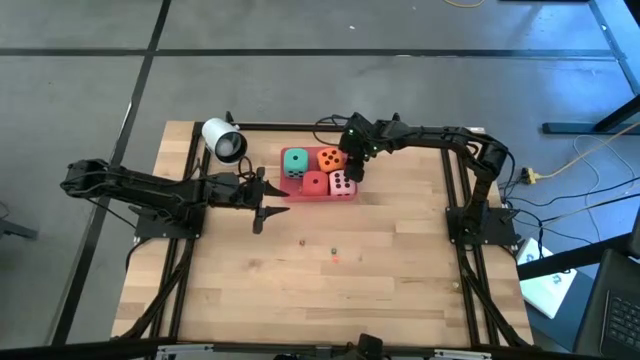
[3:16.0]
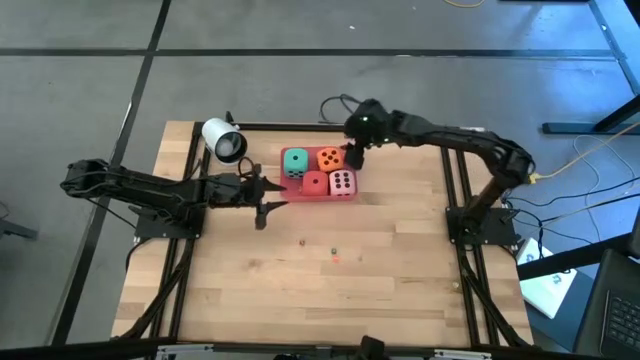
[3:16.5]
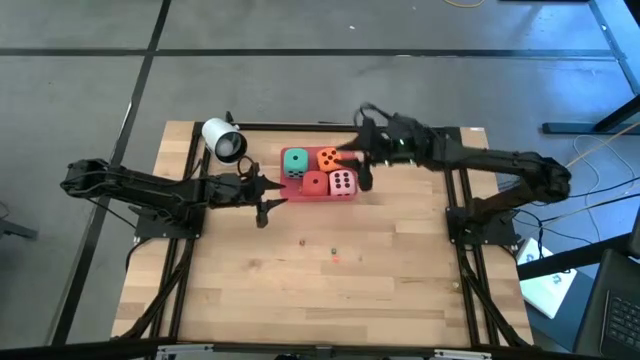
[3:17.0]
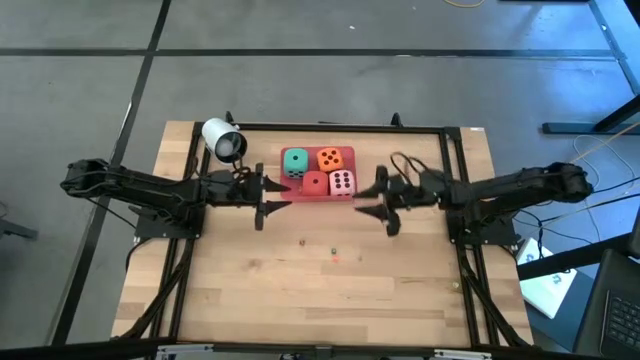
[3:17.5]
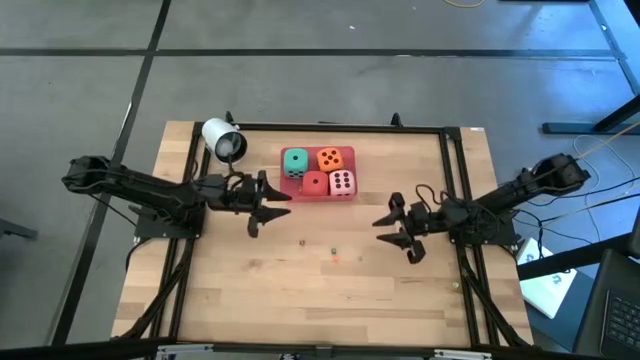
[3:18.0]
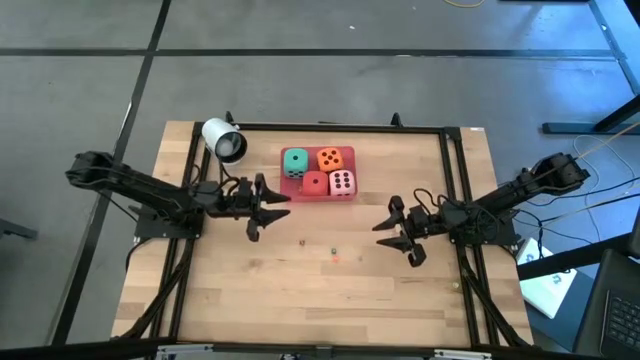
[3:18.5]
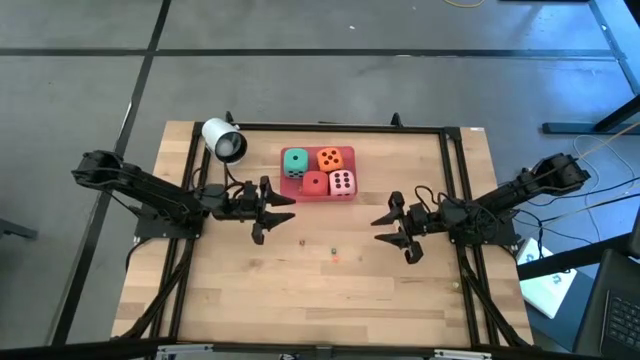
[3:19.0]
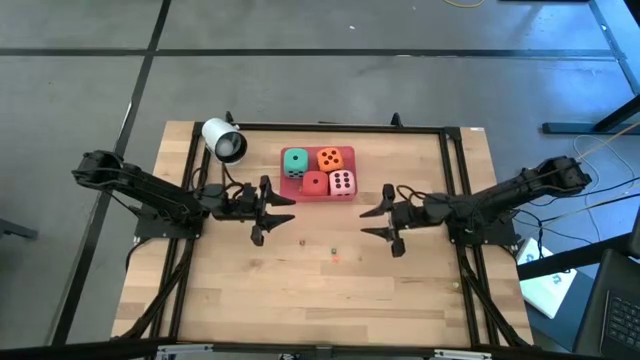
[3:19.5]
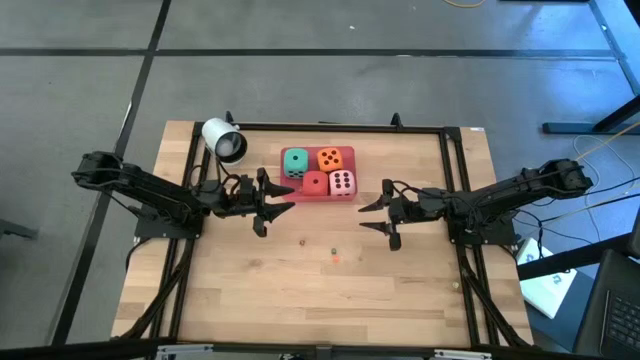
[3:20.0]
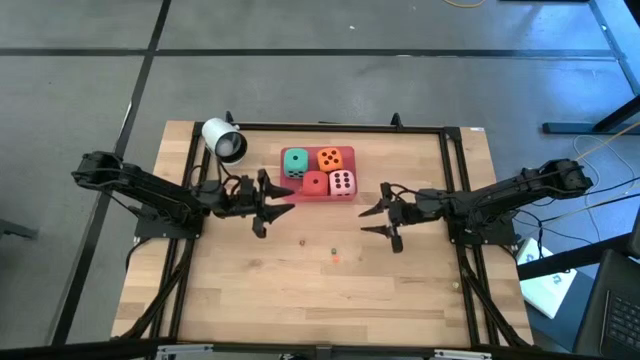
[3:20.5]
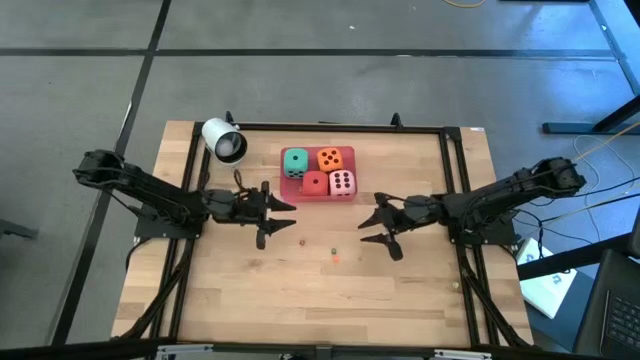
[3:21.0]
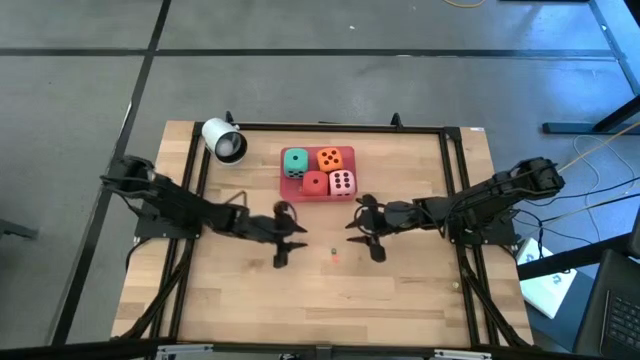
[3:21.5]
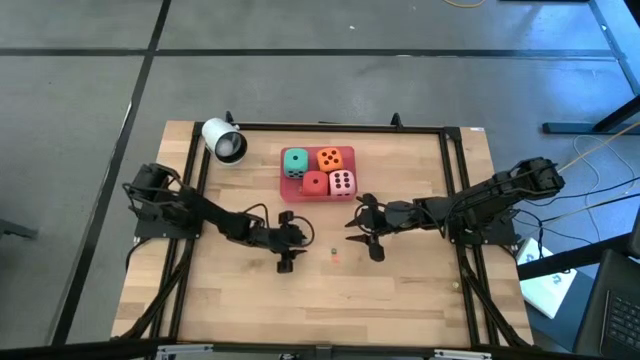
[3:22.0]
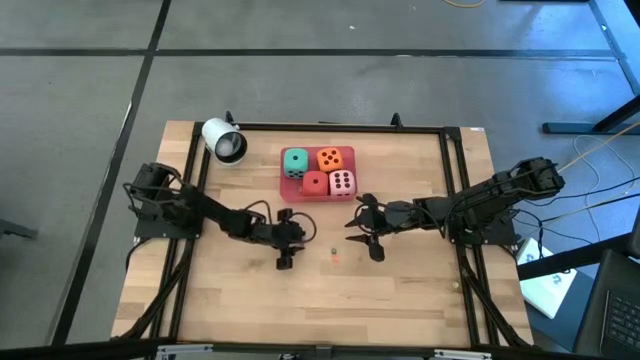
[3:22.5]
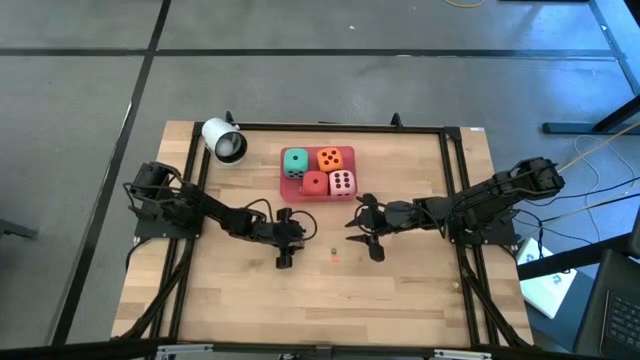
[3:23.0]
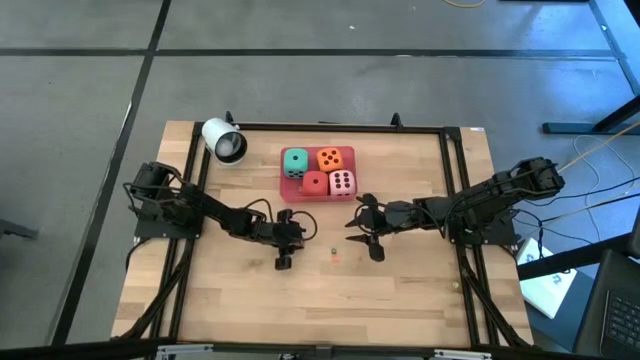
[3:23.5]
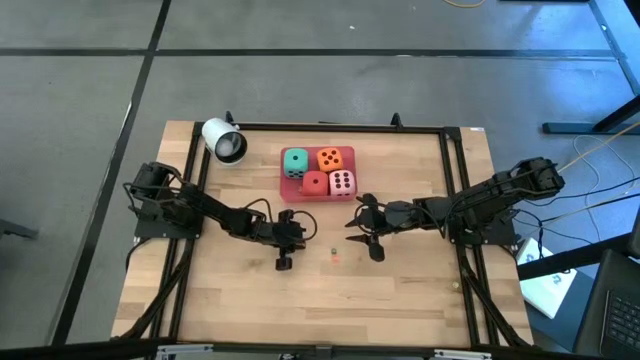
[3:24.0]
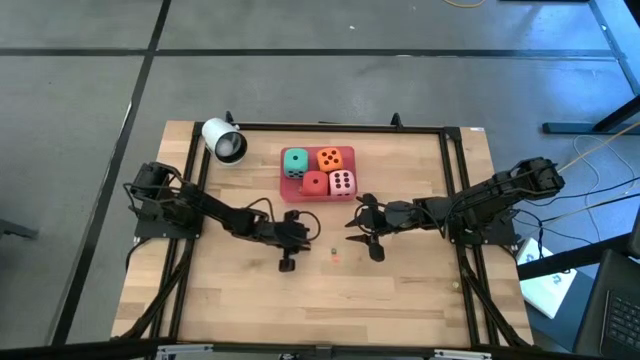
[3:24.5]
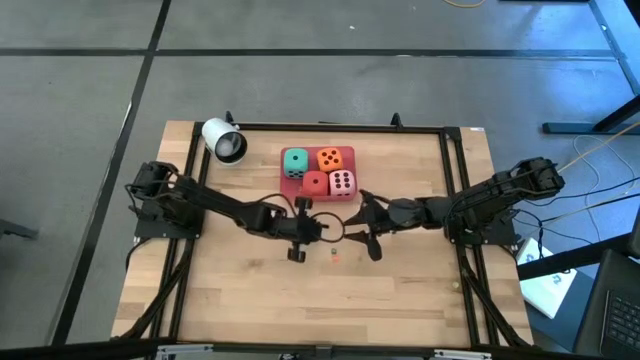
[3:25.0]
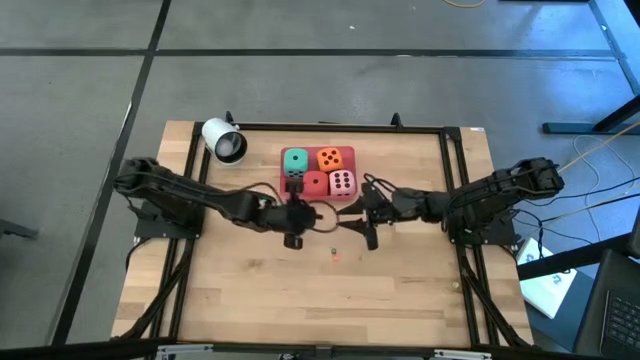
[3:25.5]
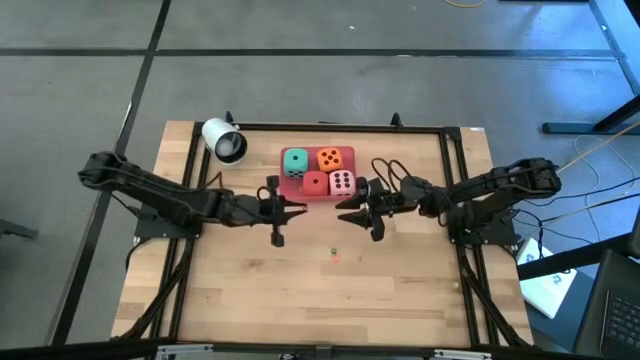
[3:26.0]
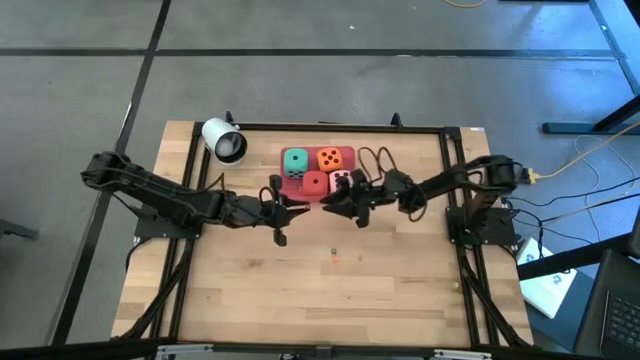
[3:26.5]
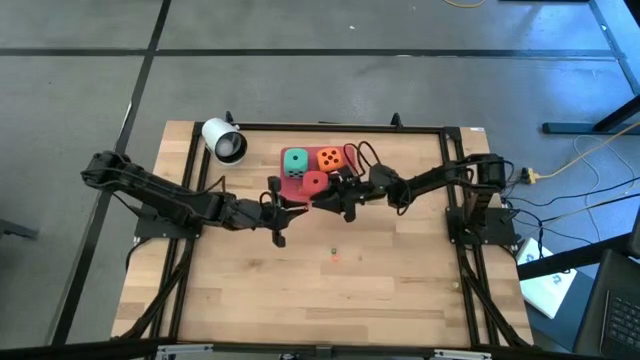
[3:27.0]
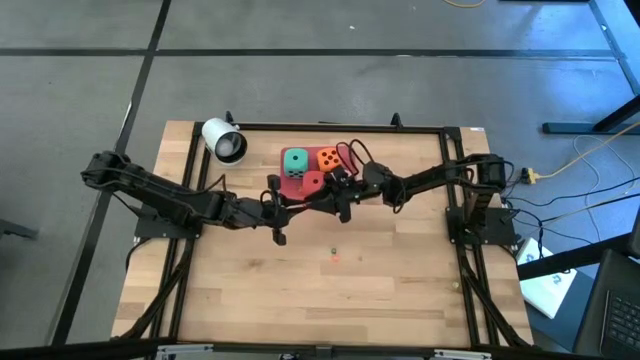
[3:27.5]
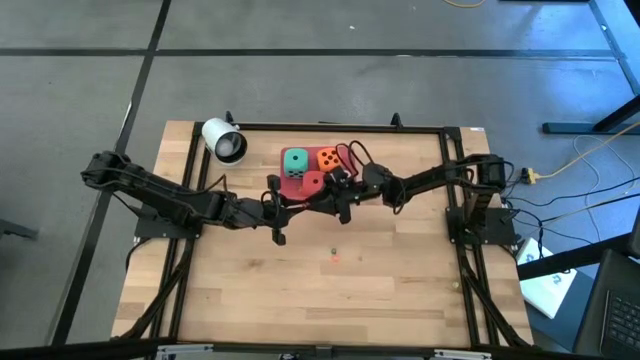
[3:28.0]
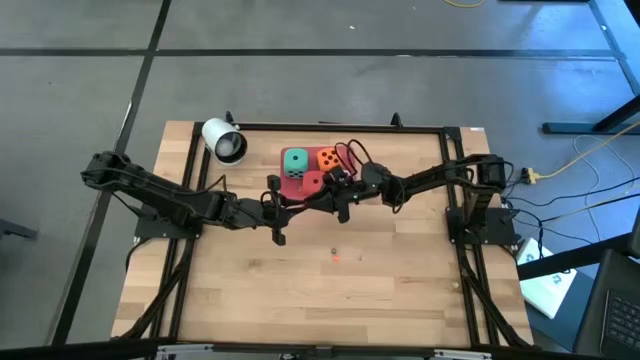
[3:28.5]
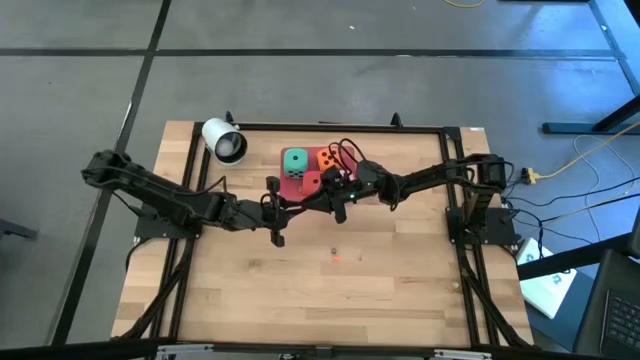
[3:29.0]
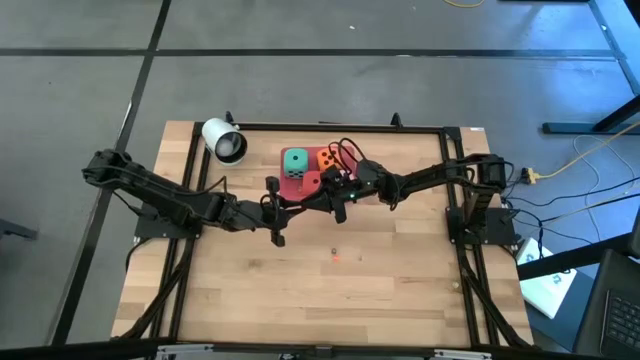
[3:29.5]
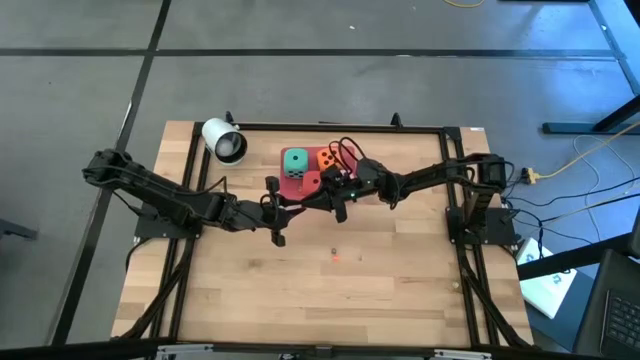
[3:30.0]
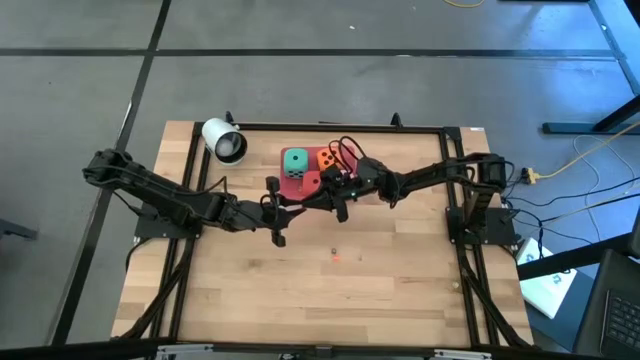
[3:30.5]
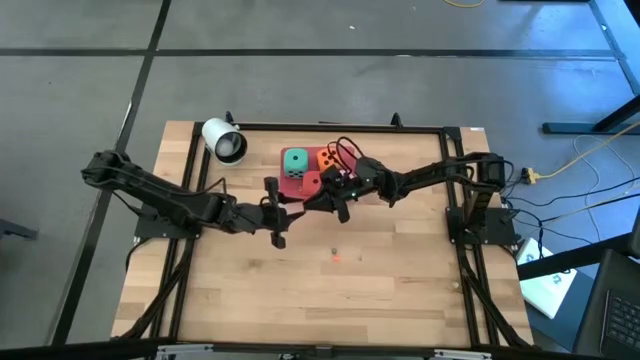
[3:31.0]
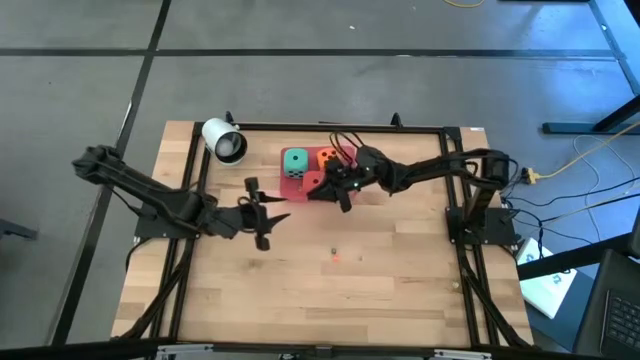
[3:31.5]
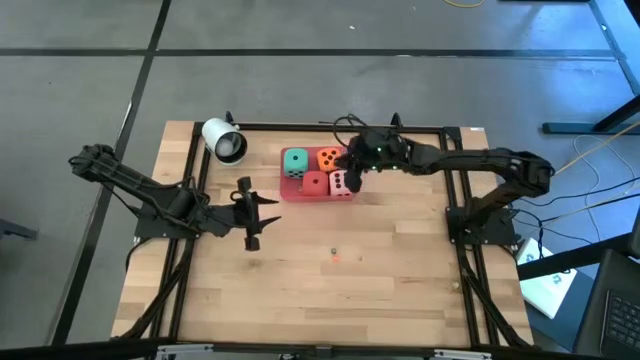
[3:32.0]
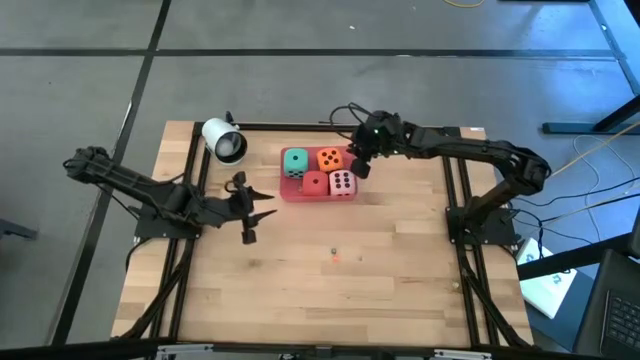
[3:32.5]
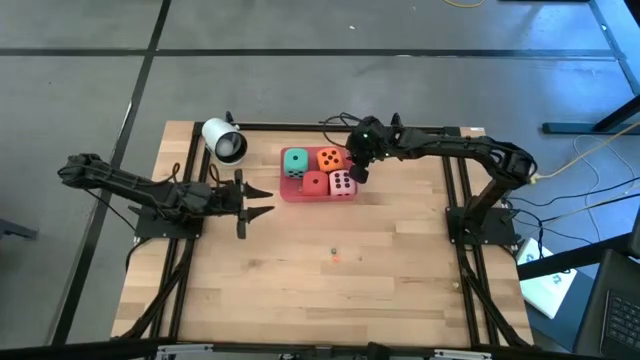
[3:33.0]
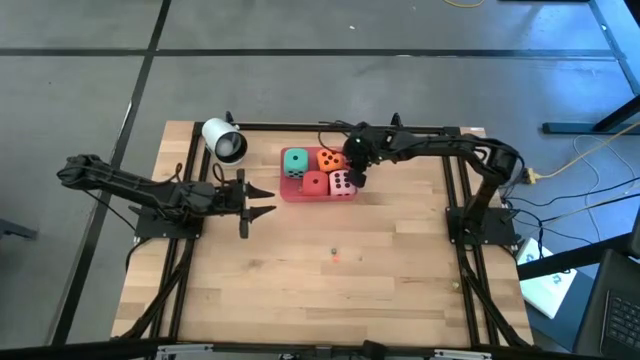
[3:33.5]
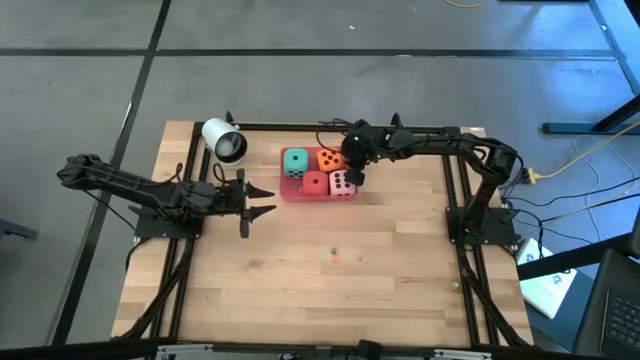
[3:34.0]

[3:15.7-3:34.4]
Task: Pick & Place Dice
Put the small red dice into the pink bin

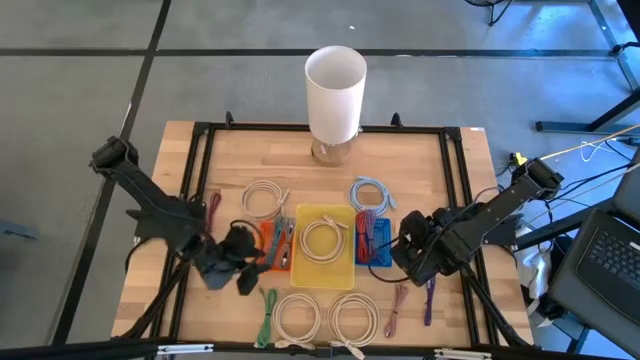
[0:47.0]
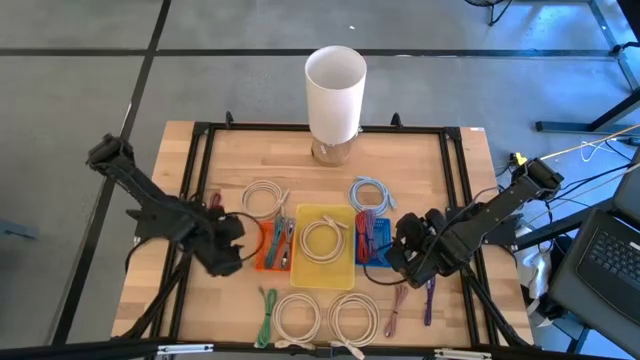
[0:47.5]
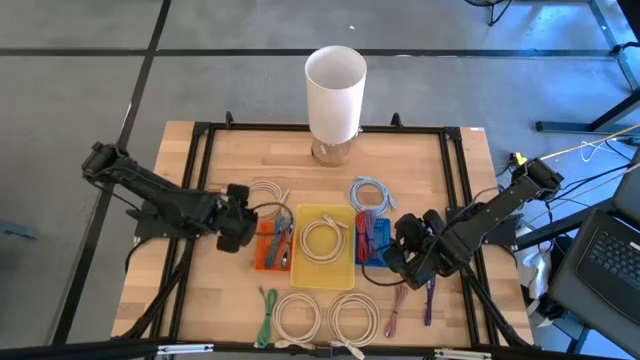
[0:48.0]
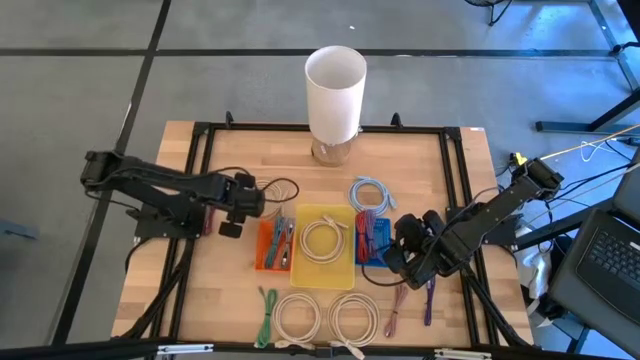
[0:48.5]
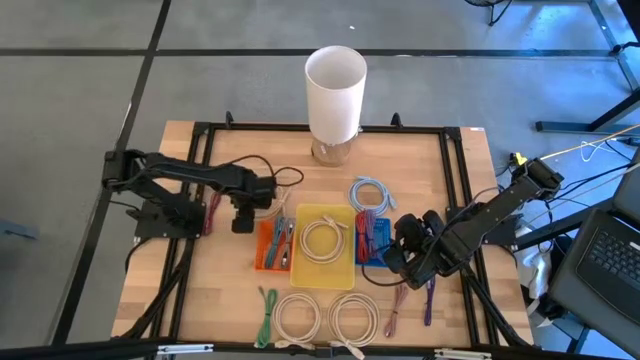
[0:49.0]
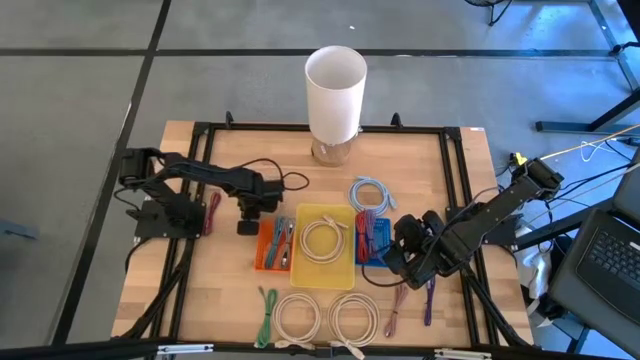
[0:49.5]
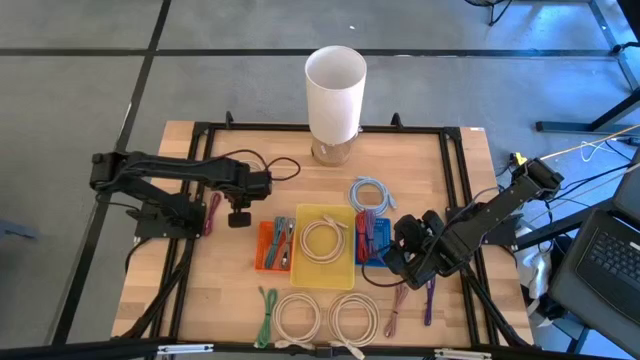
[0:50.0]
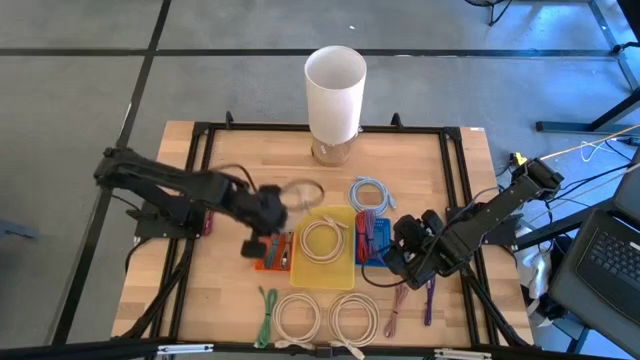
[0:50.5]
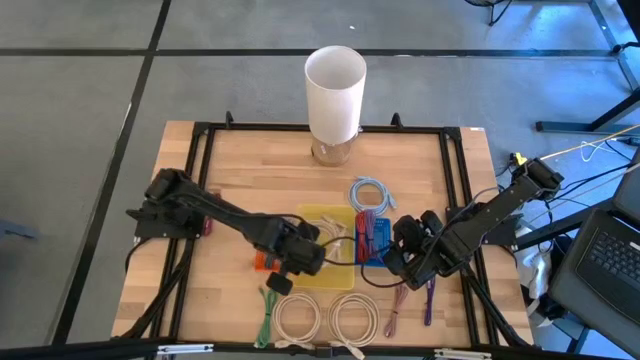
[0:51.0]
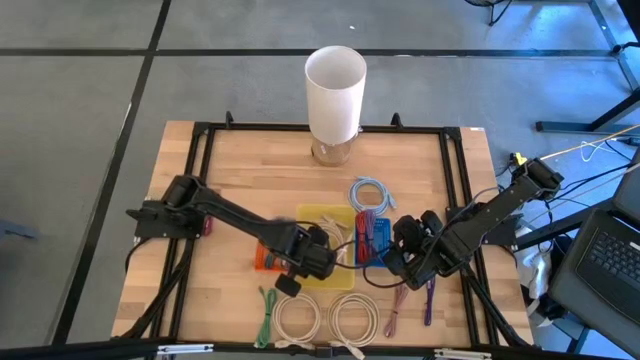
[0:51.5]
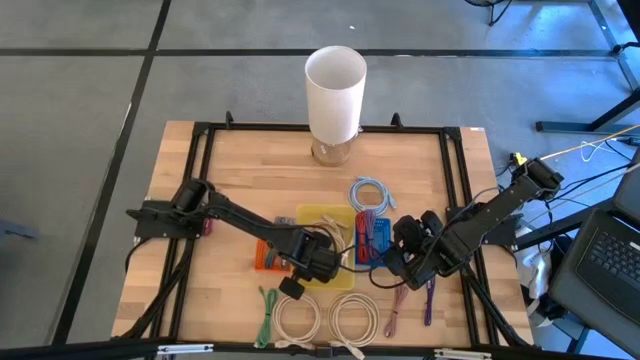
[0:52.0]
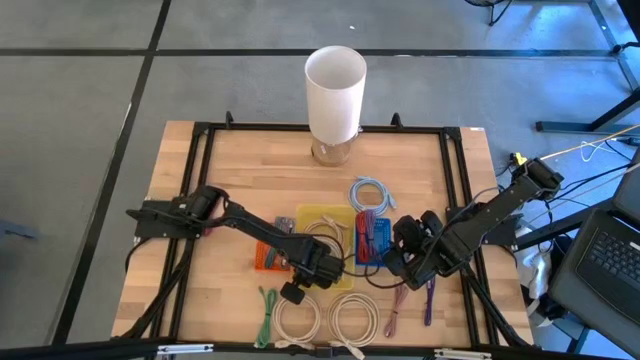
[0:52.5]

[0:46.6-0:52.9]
Task: Pick & Place USB Port
Put the brown HDMI cable into the yellow bin
